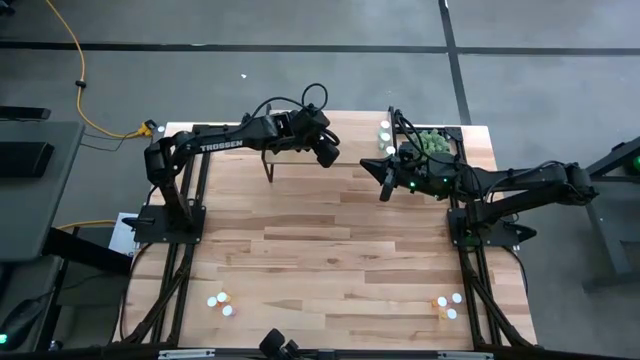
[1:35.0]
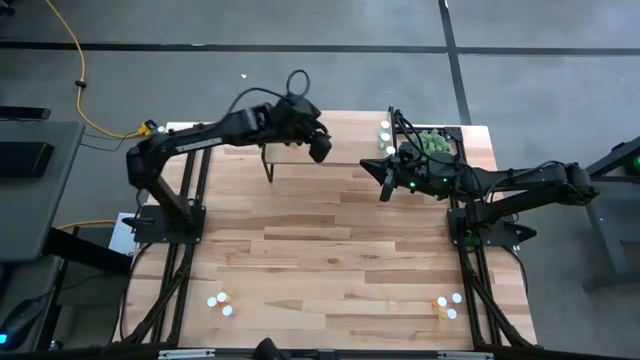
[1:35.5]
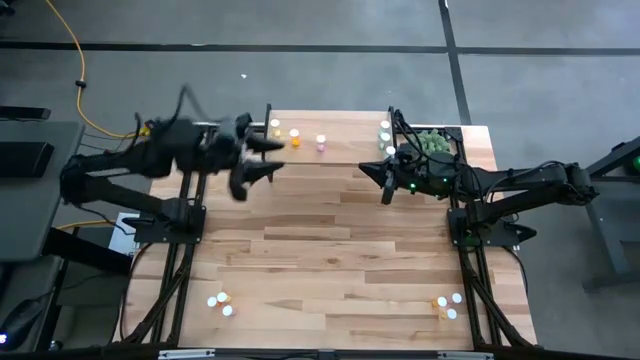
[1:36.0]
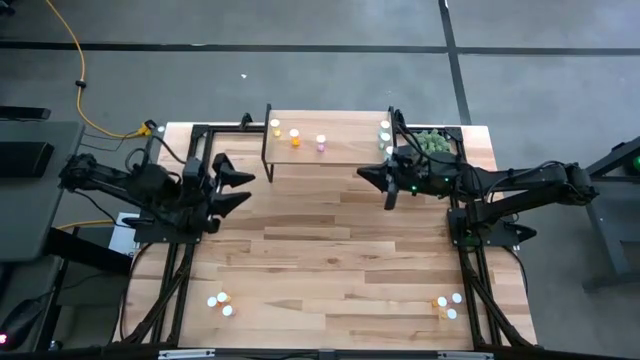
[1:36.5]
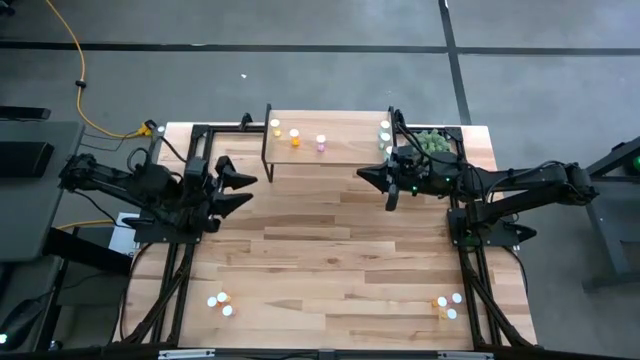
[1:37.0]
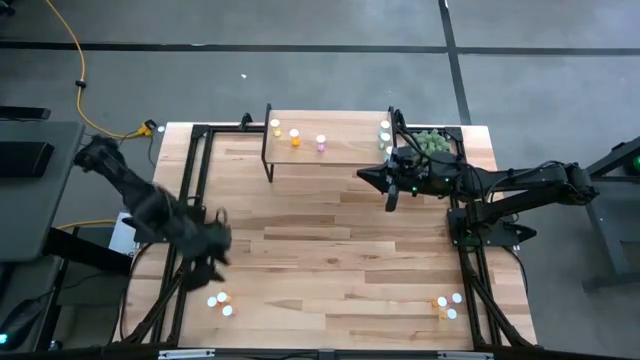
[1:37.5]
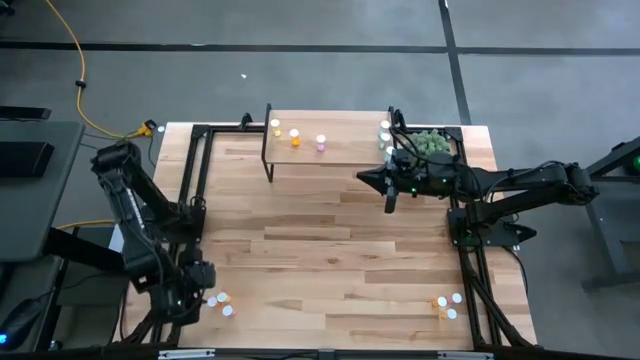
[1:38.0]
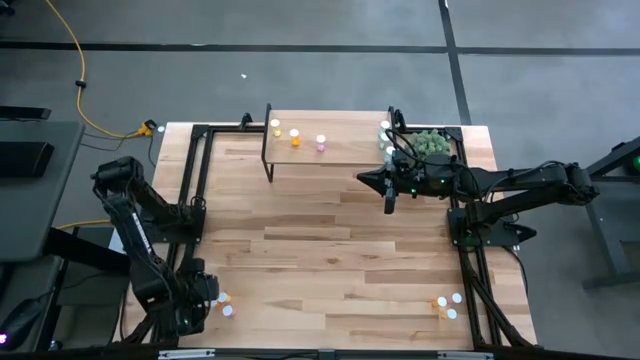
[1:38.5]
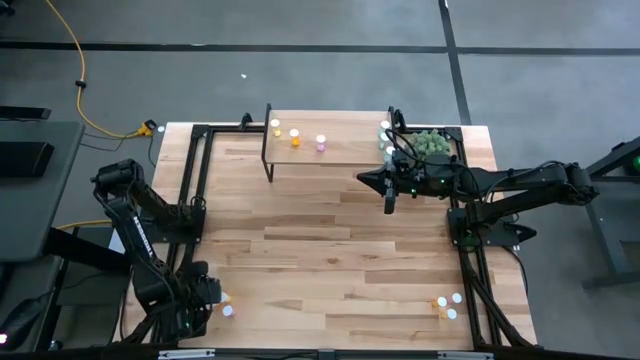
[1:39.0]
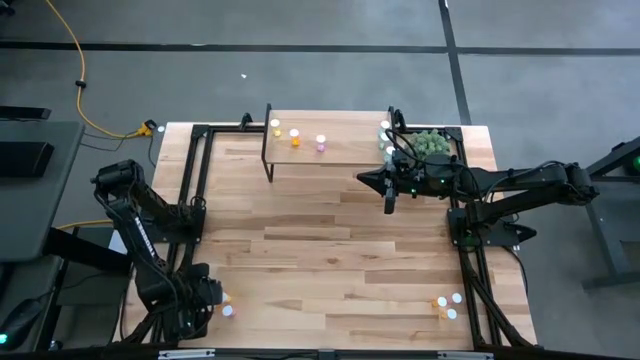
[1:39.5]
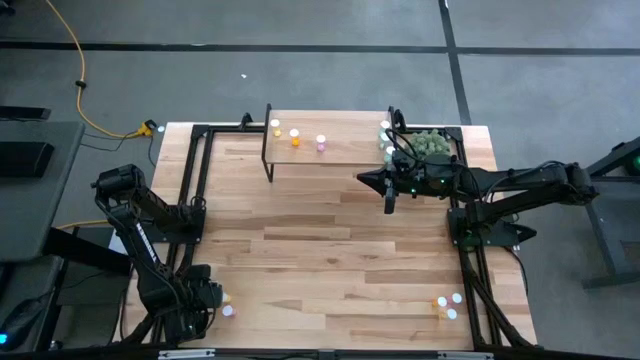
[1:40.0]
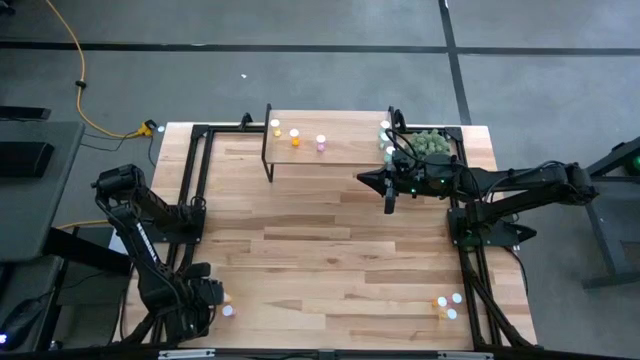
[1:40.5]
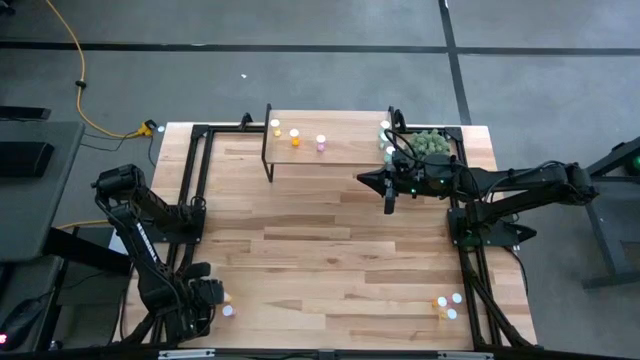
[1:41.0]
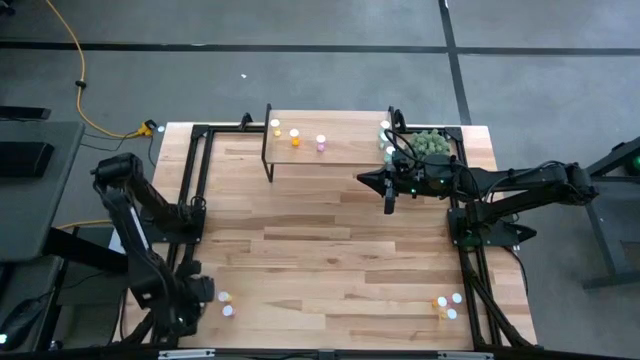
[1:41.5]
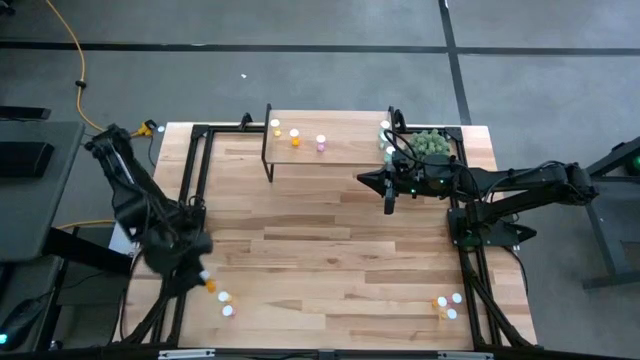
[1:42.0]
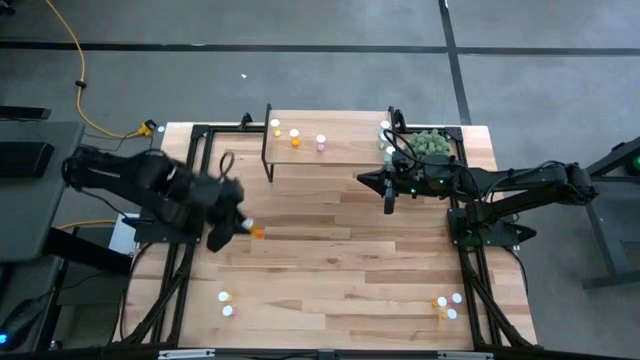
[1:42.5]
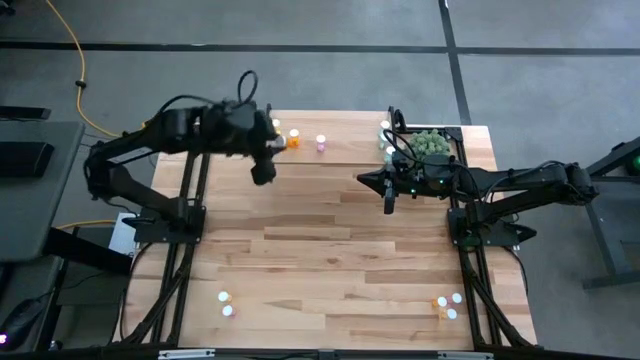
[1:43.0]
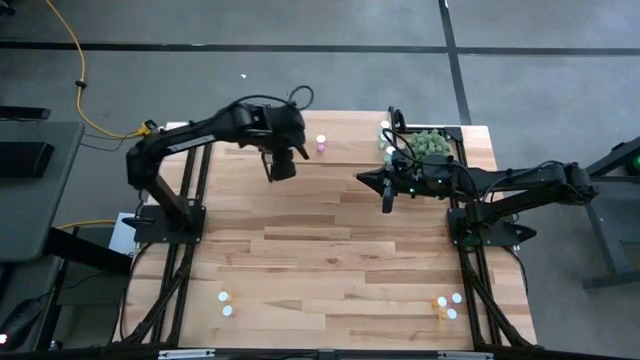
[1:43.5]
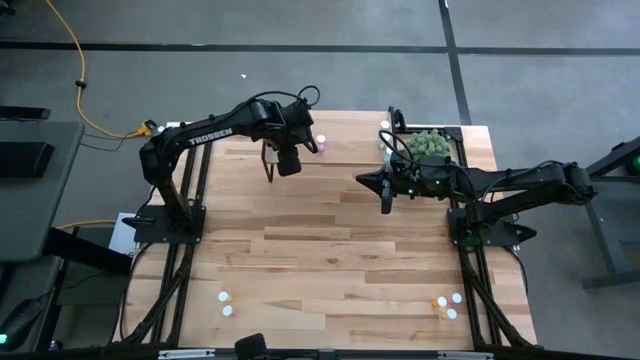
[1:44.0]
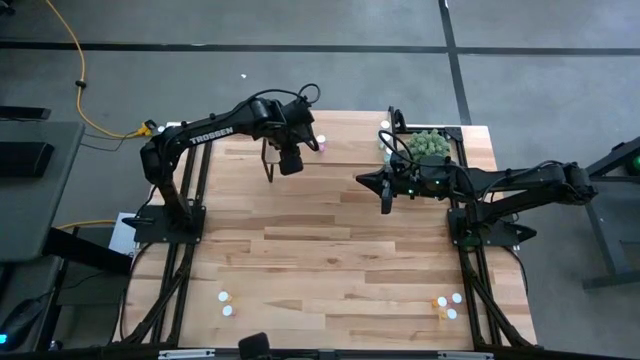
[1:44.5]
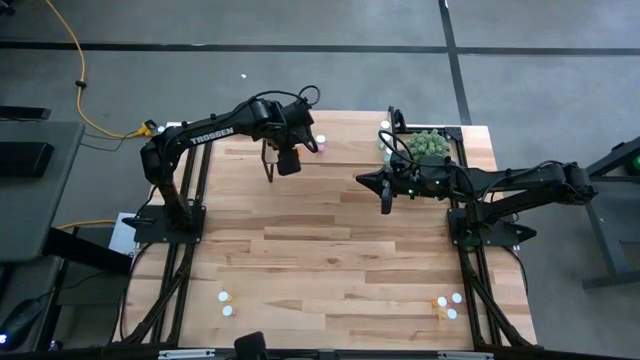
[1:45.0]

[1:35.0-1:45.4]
Task: Pick and place medicine bottles onto shelf by color
Put the left orange pill bottle aligned with the other orange pill bottle on the shelf

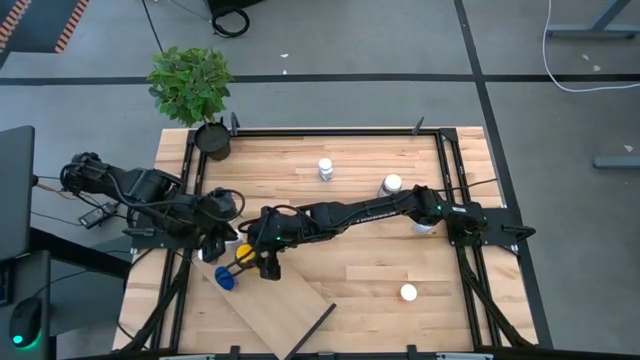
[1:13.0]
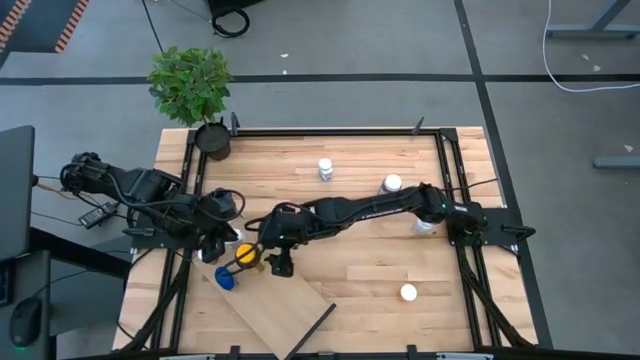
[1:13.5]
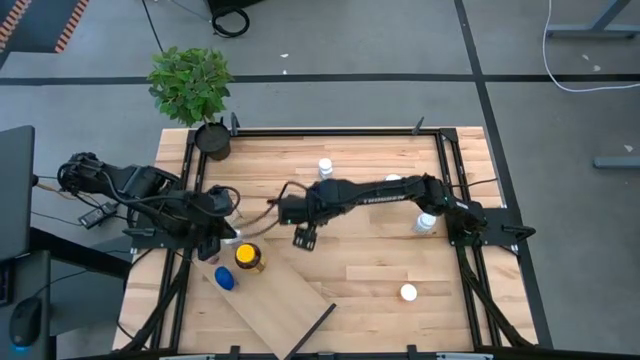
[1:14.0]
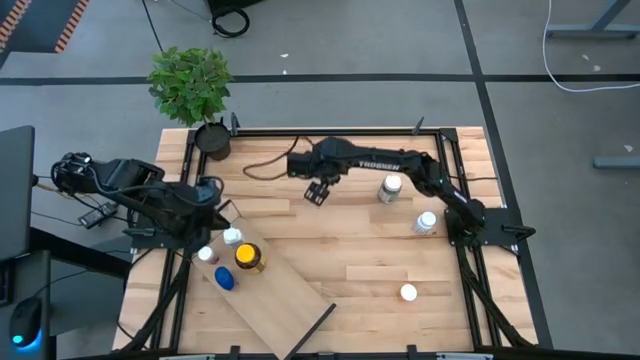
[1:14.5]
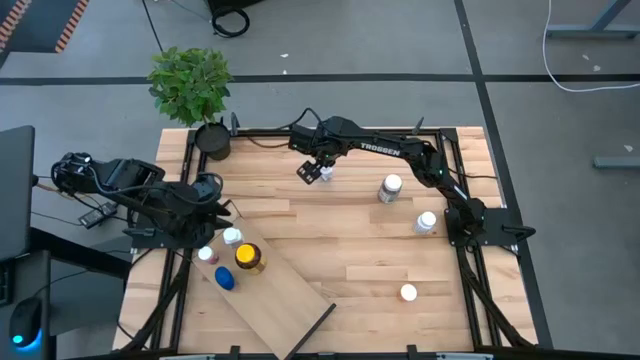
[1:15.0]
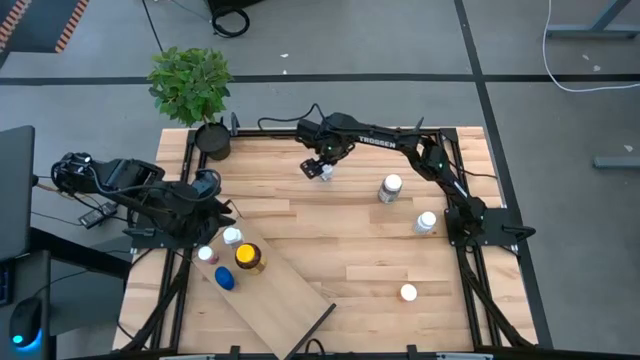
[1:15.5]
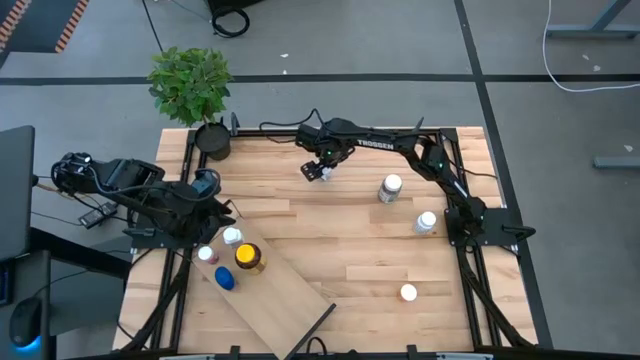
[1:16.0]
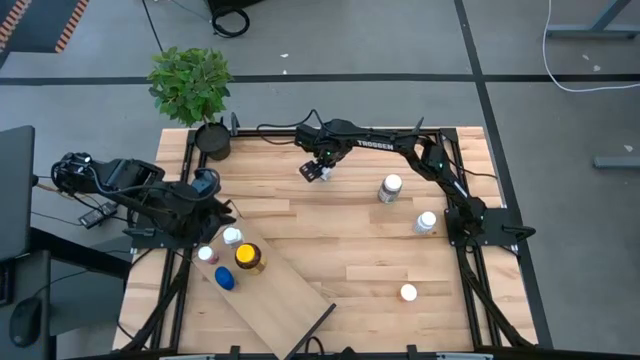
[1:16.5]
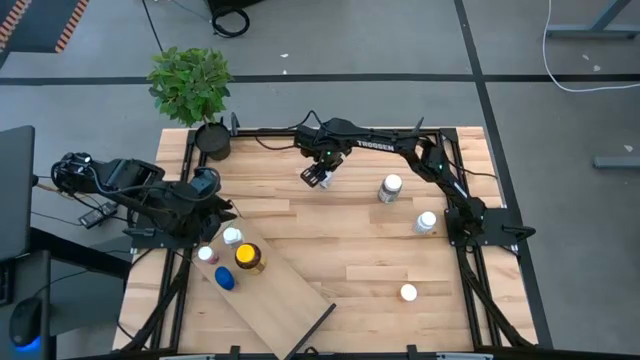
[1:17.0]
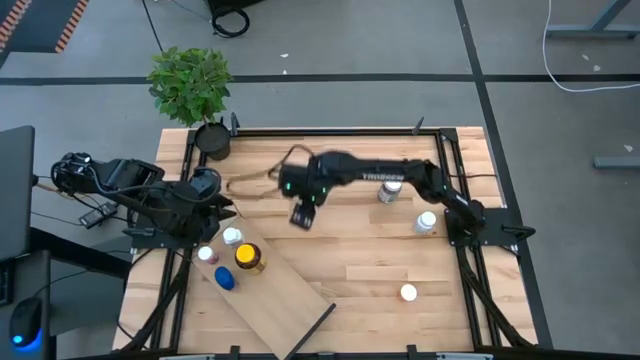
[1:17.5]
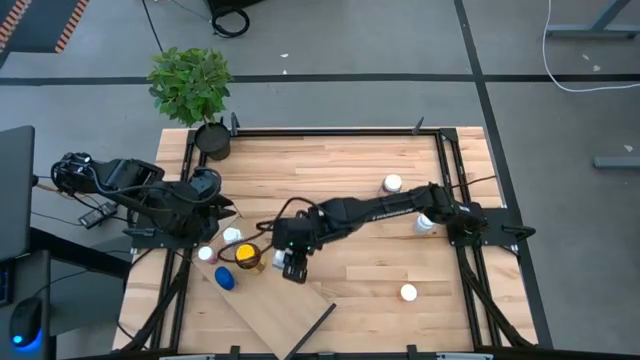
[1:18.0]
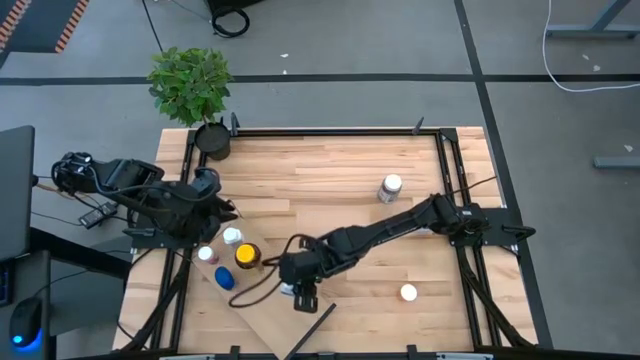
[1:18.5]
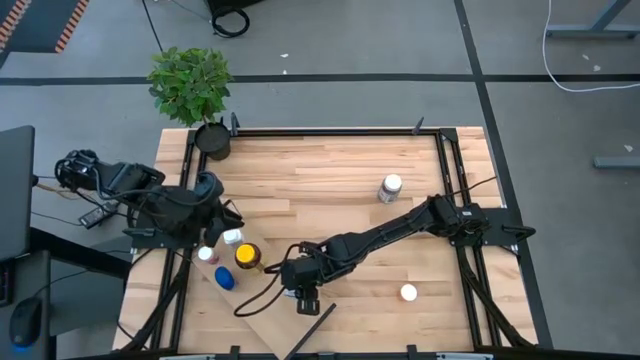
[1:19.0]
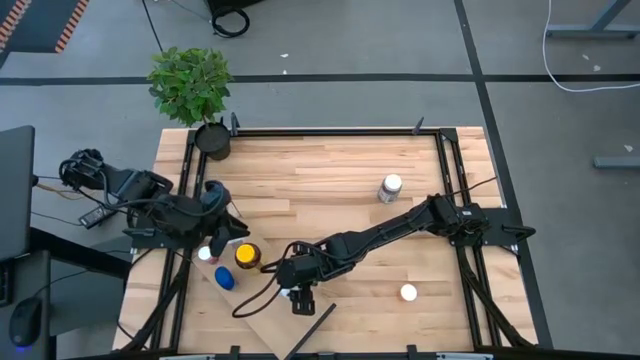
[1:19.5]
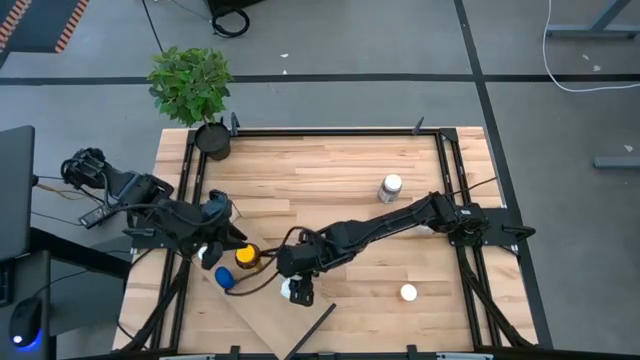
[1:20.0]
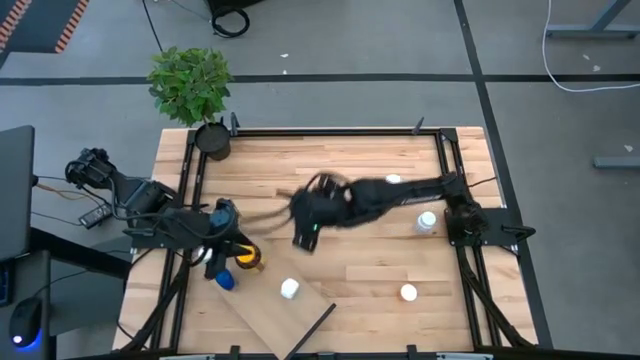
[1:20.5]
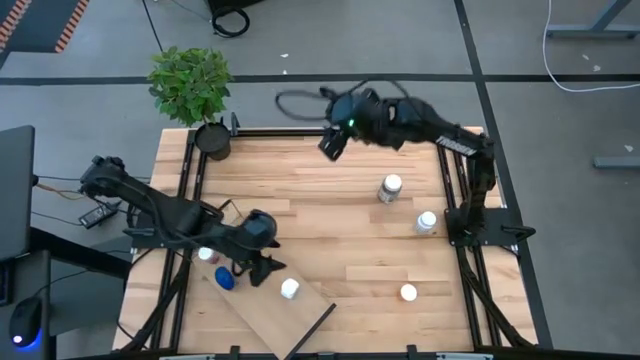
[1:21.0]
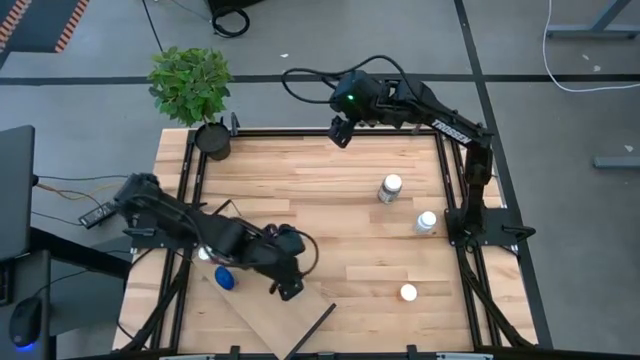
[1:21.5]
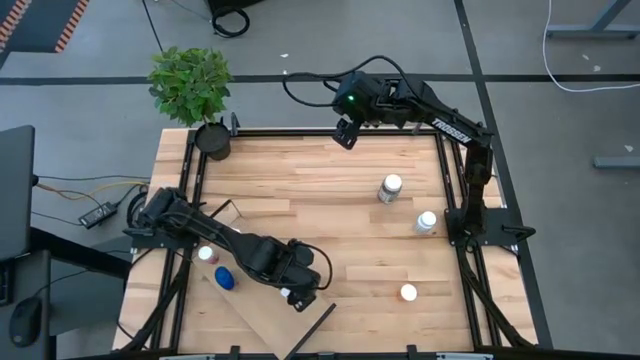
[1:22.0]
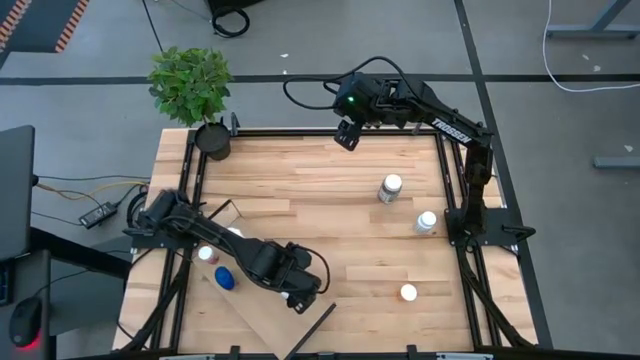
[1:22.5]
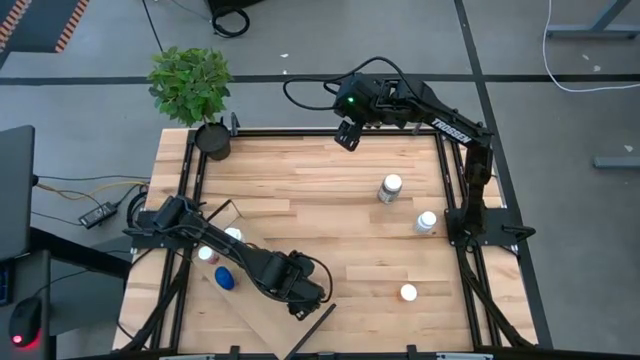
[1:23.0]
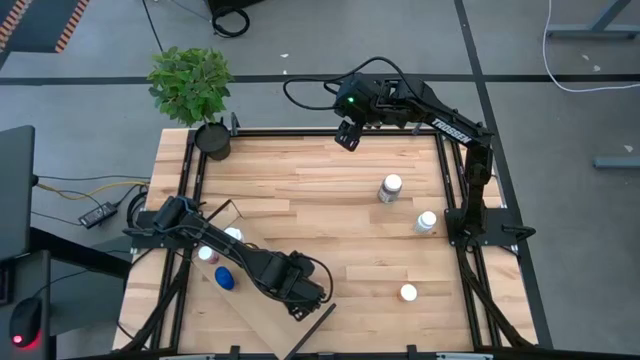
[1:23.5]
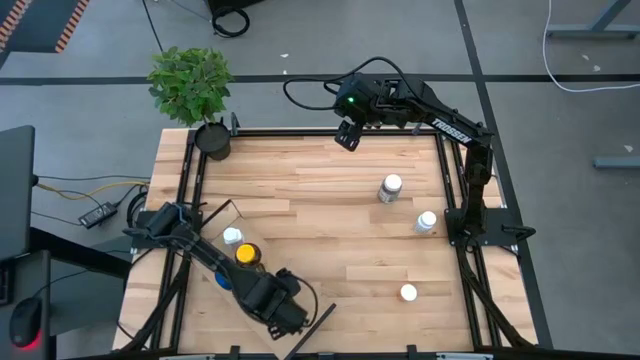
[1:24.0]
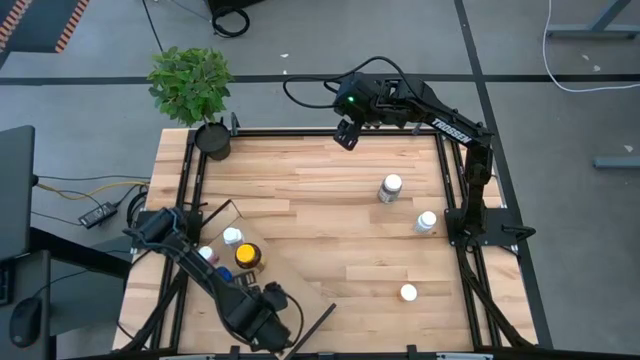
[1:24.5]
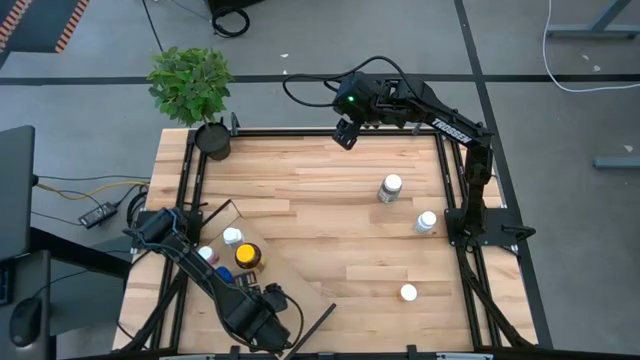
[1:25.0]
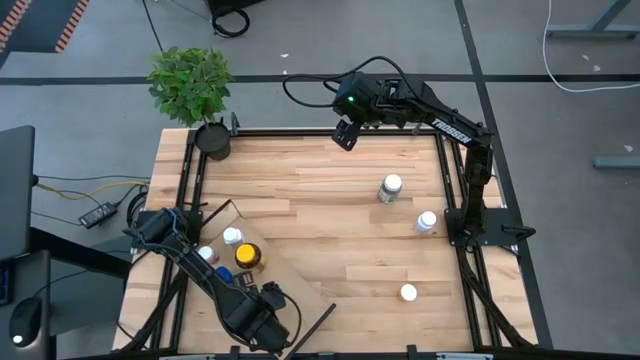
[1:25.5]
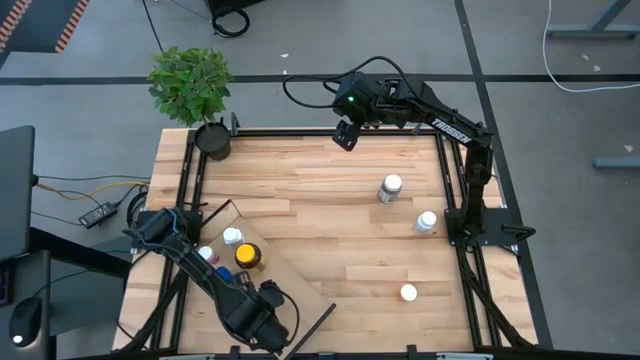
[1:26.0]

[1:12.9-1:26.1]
Task: Pick and place medicine bottles onto shelf by color
Put the top white pill bottle on the shelf
